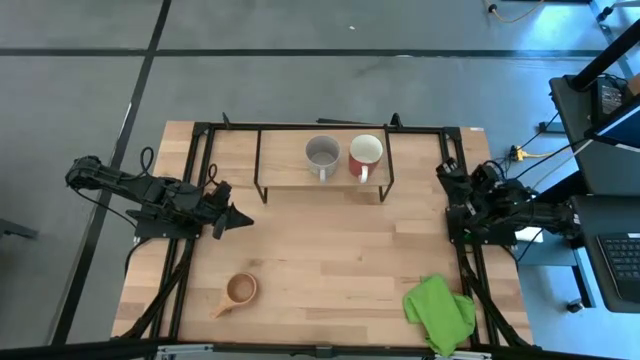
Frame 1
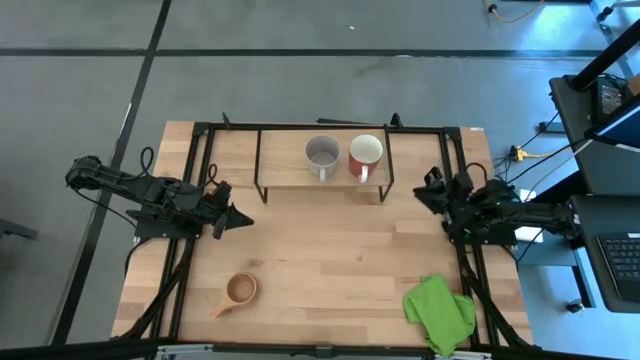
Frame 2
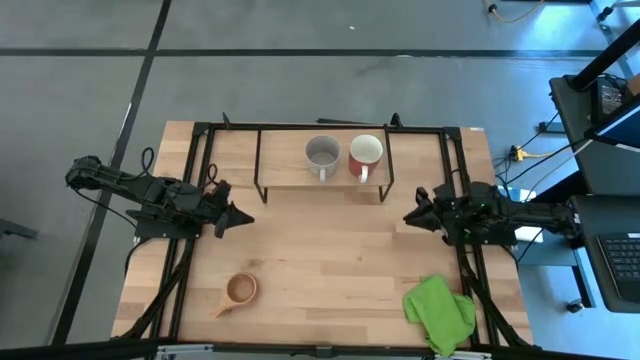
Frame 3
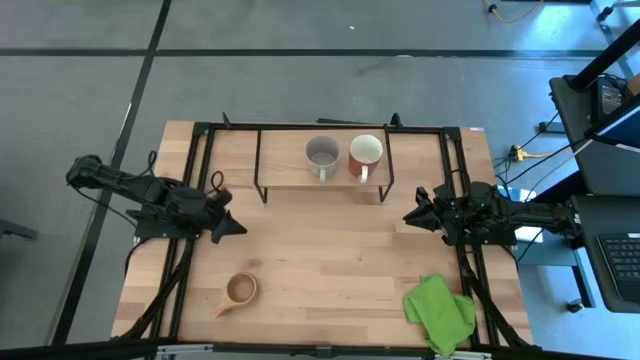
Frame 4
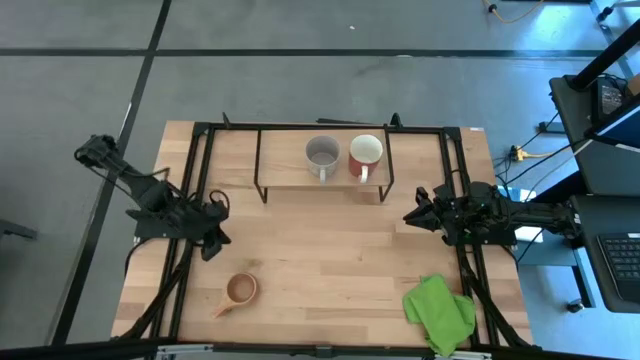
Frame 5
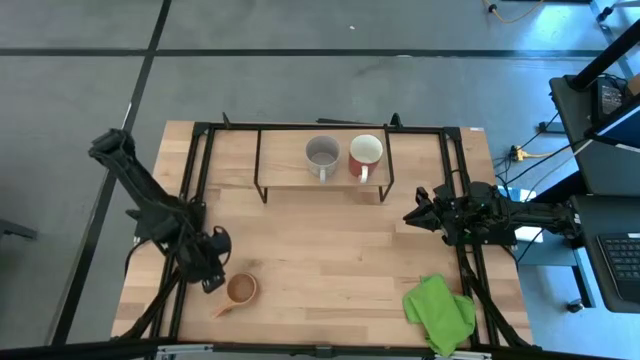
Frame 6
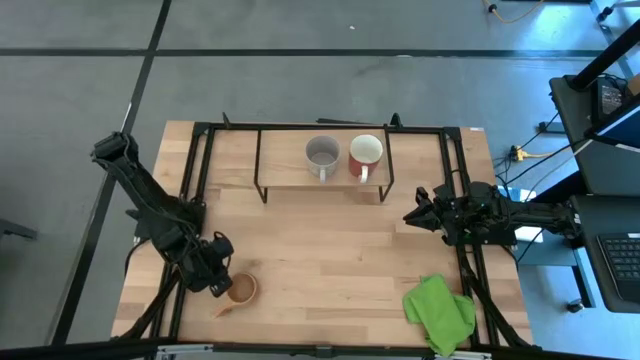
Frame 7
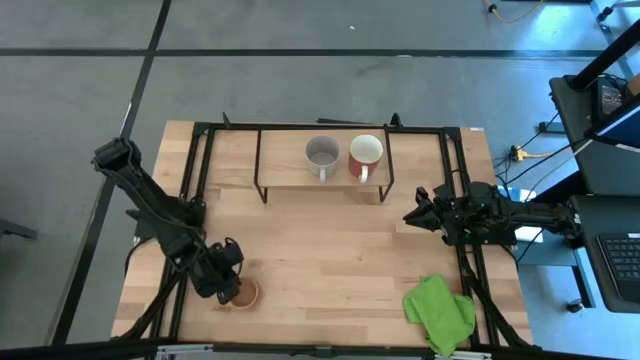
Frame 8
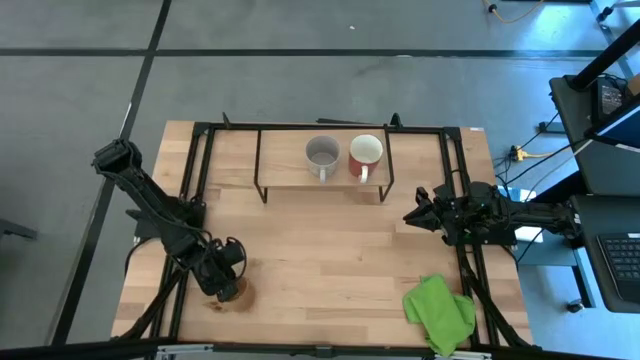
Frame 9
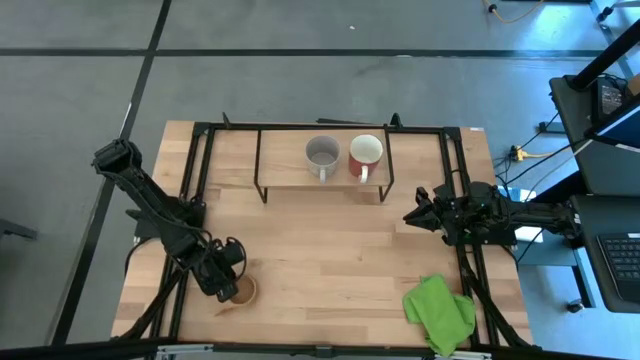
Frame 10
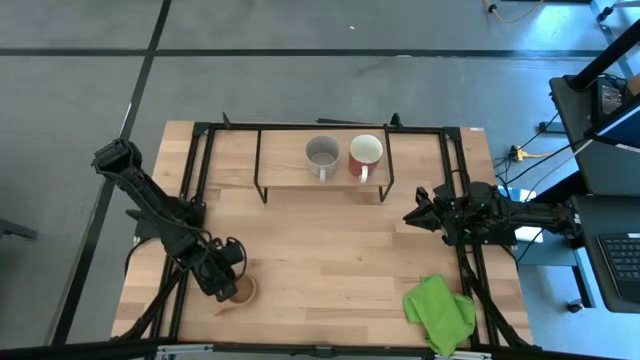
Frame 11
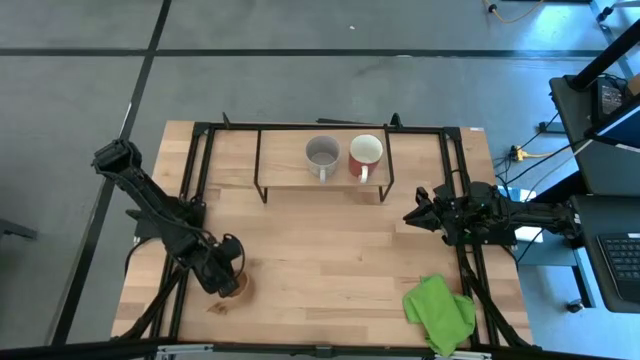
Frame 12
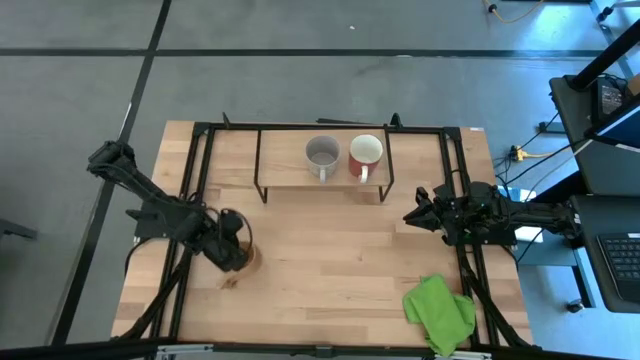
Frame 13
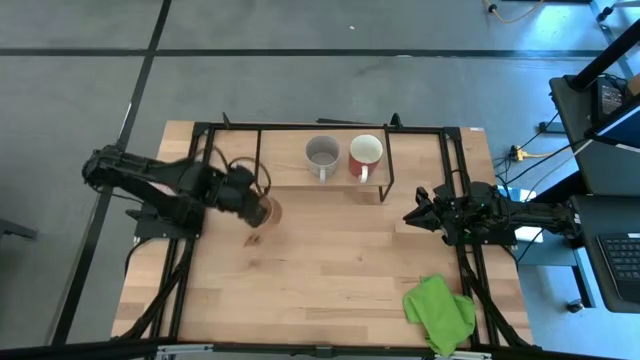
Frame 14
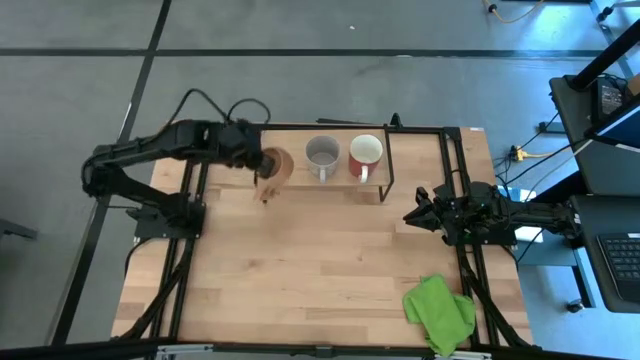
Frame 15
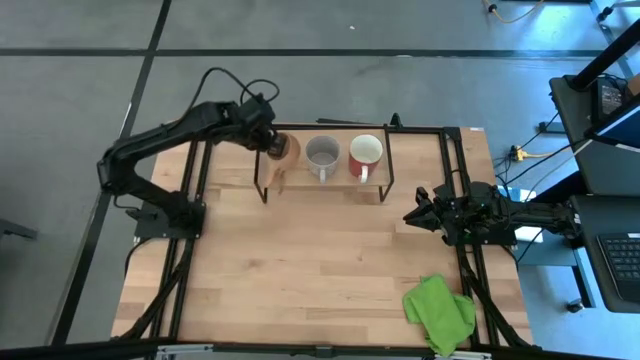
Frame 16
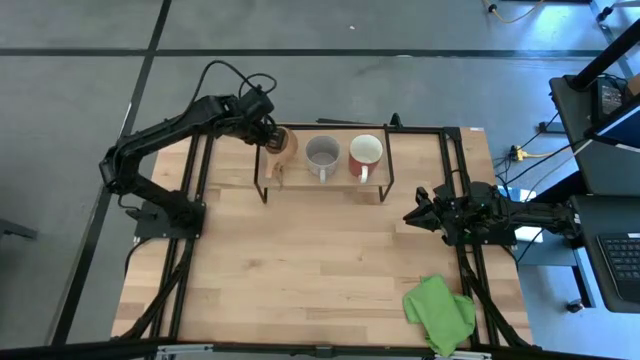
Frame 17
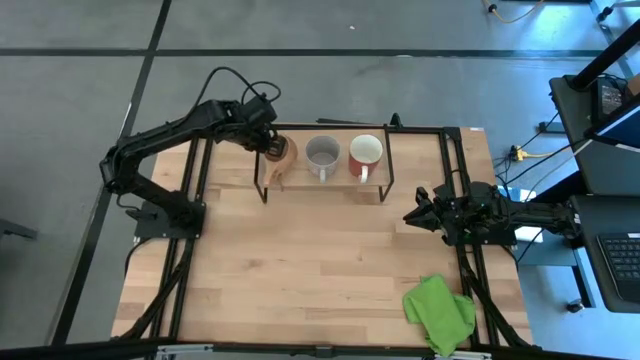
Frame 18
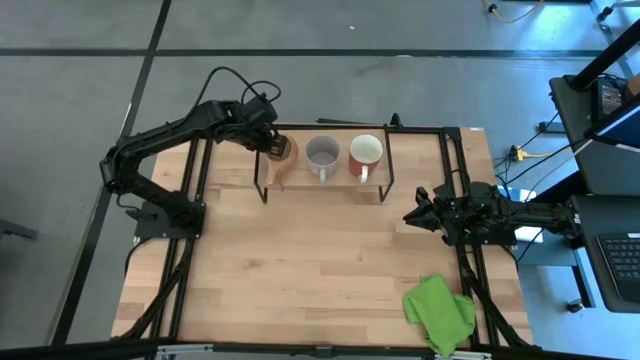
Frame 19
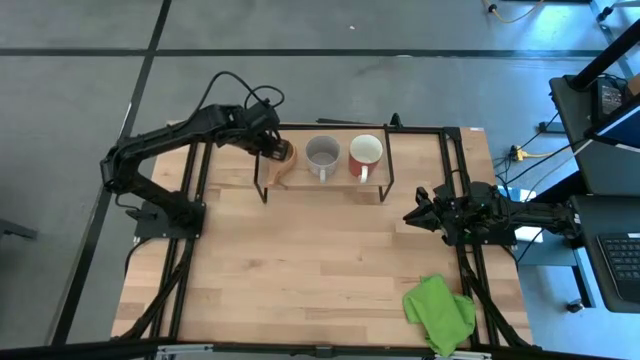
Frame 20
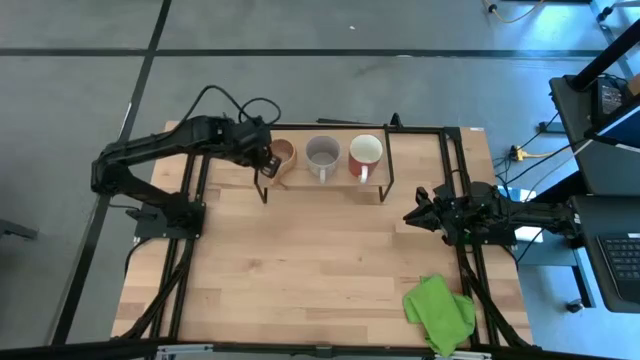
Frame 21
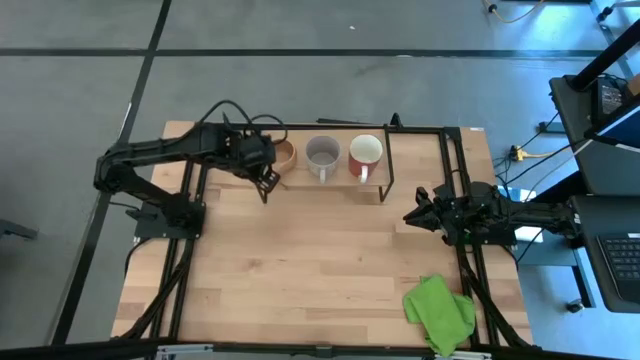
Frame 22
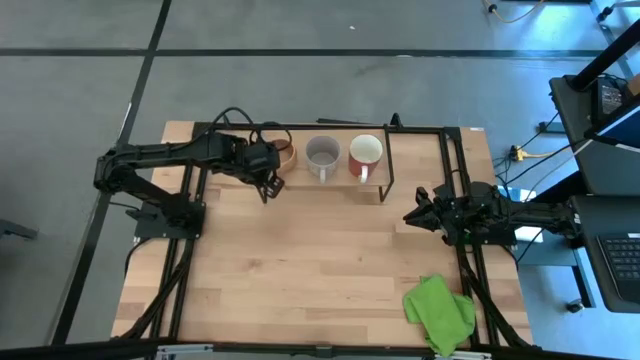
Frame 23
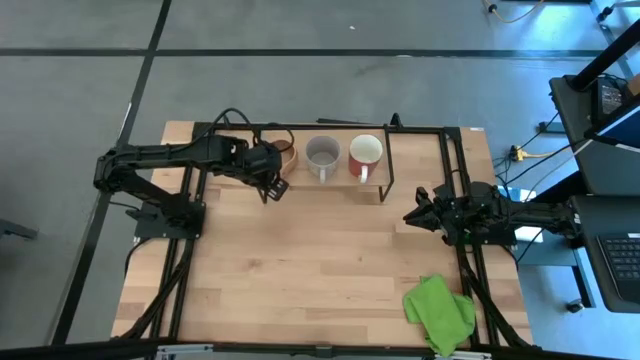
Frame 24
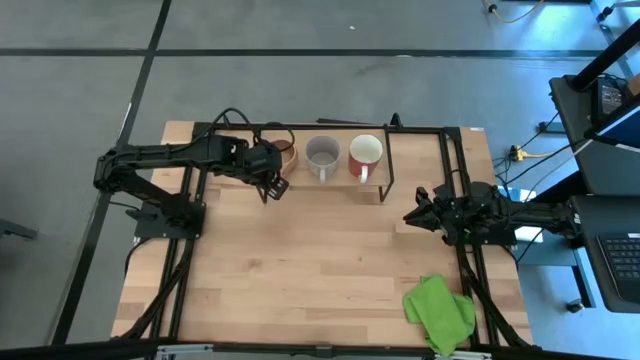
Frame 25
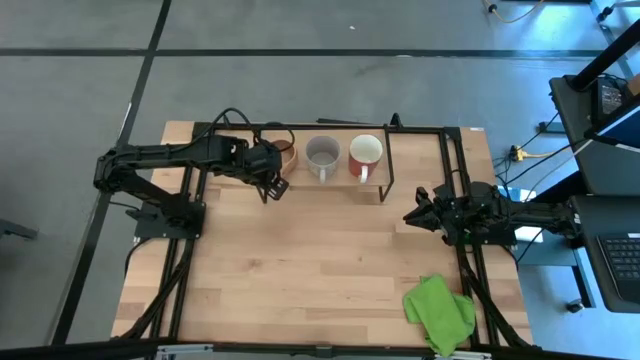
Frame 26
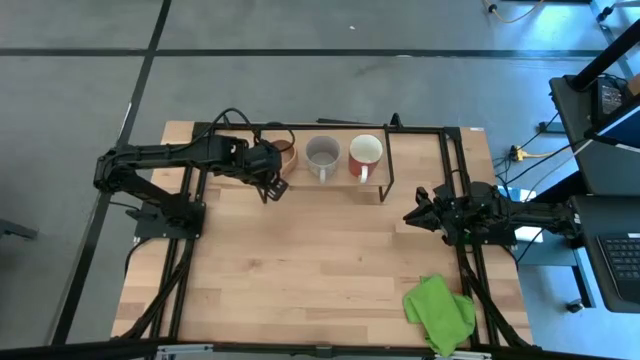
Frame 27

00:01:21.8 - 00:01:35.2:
Task: Stack small to large cups/mugs on shelf
Put the brown mug on the shelf

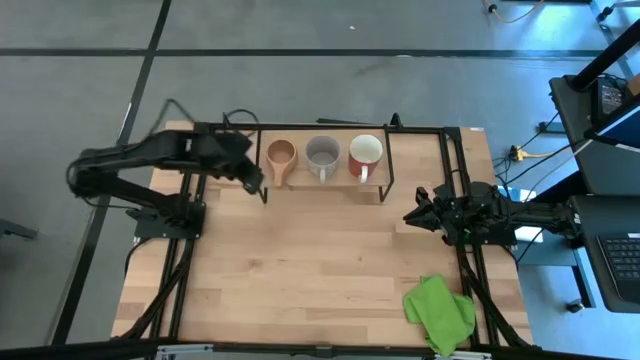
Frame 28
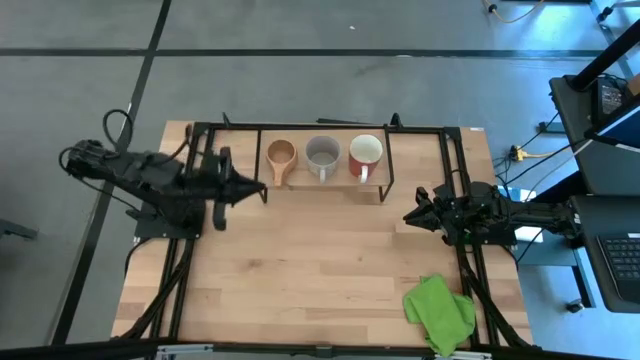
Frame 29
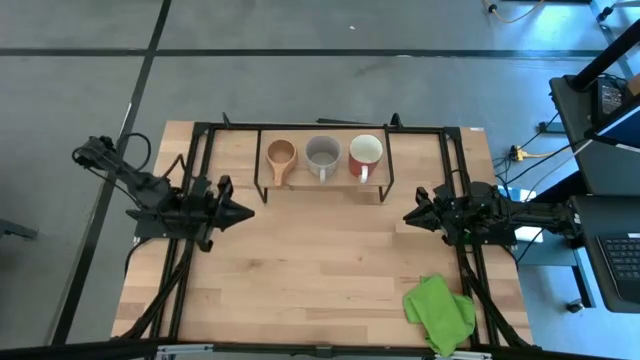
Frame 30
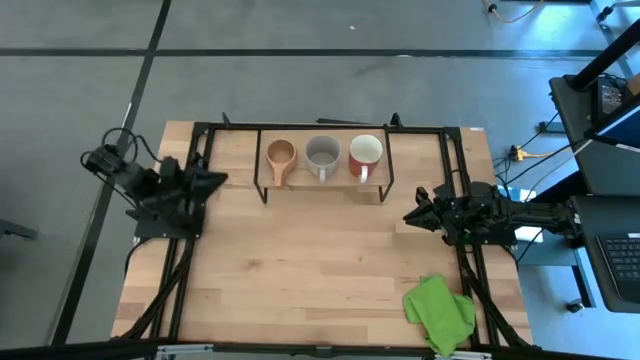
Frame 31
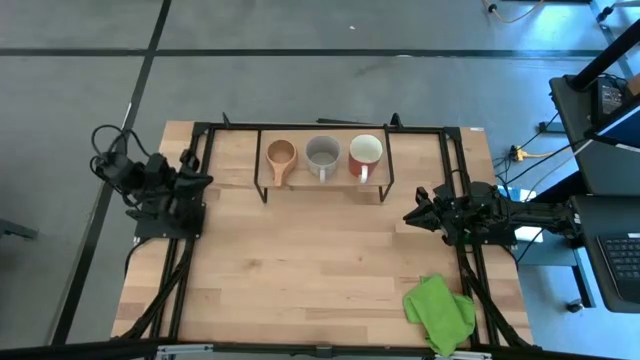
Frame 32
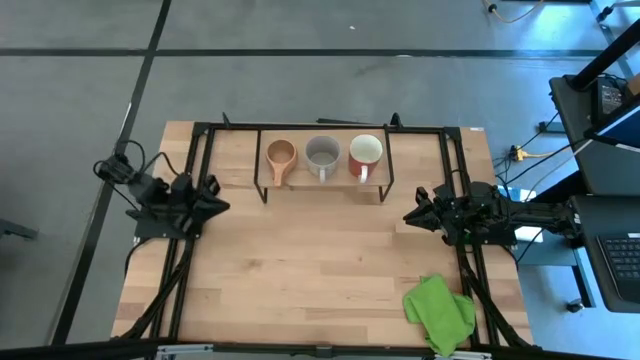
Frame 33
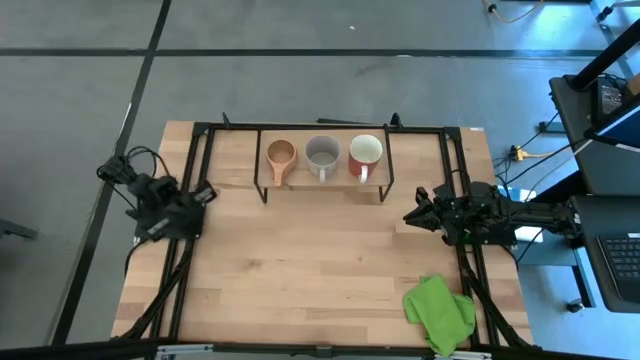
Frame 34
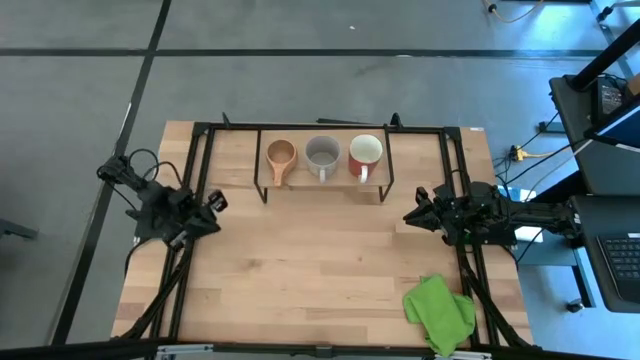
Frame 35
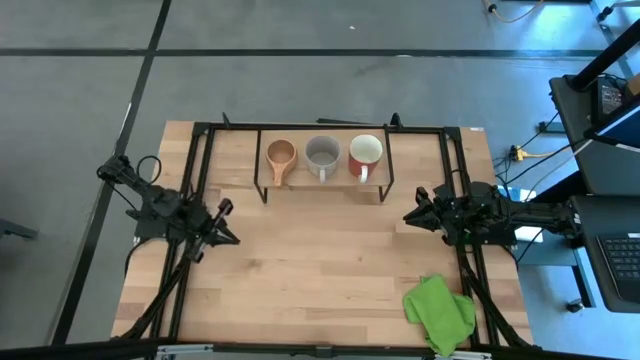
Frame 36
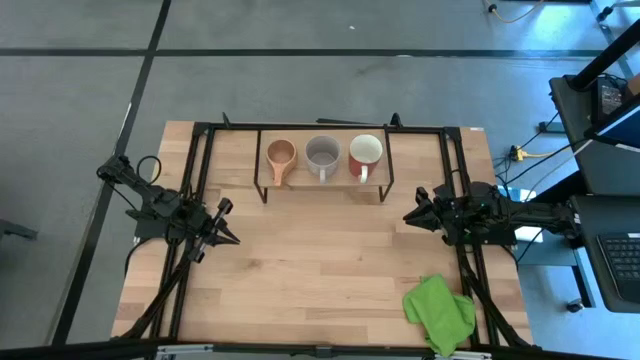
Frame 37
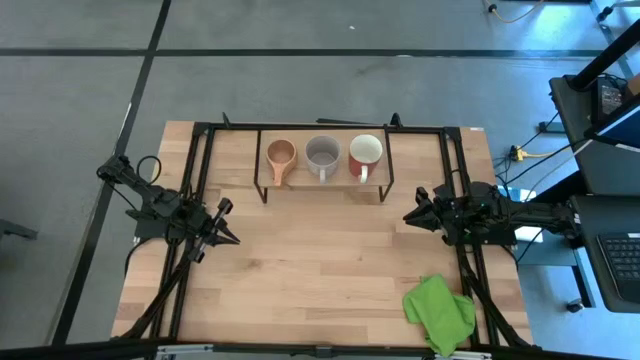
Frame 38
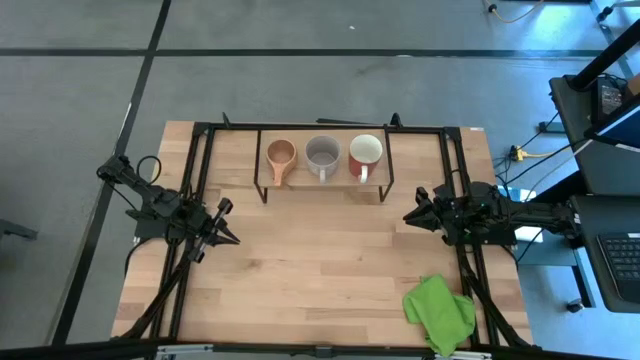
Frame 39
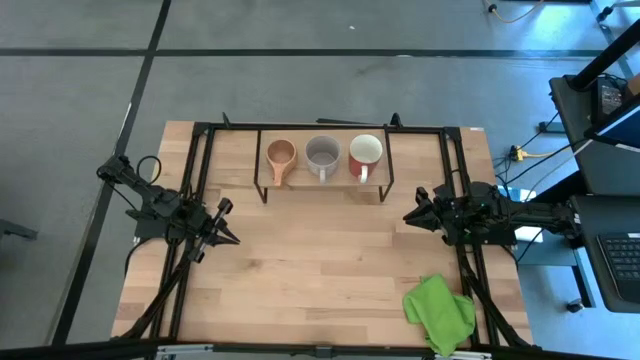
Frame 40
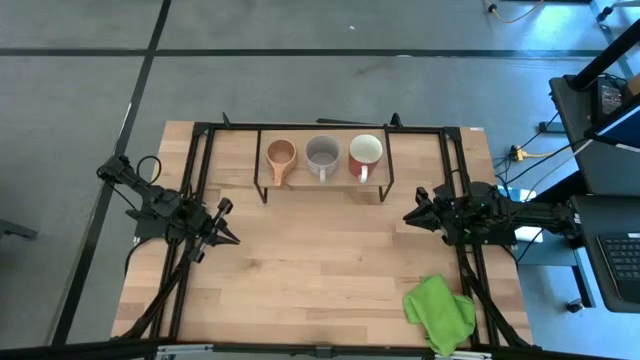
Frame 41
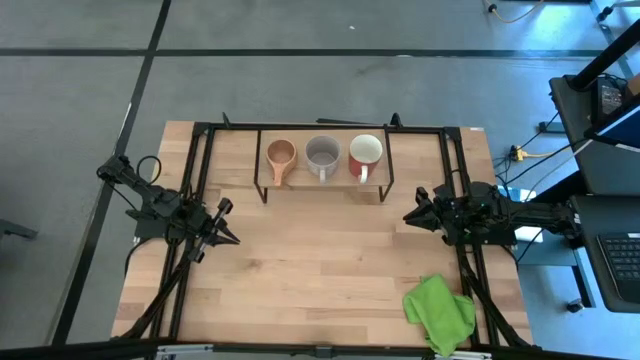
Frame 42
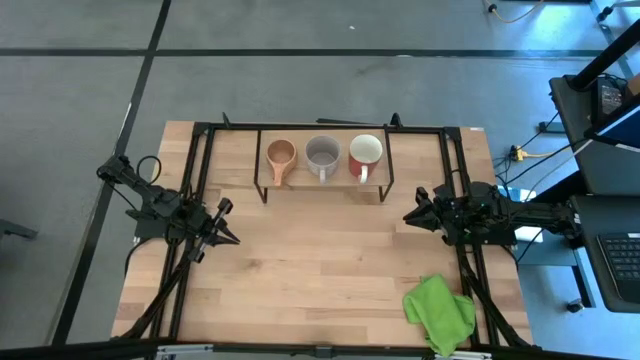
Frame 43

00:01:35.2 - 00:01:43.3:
Return to Home Position
